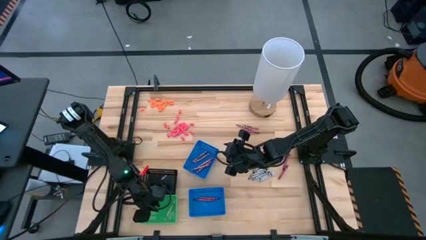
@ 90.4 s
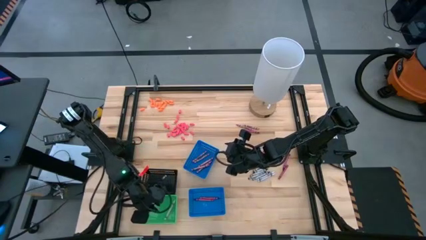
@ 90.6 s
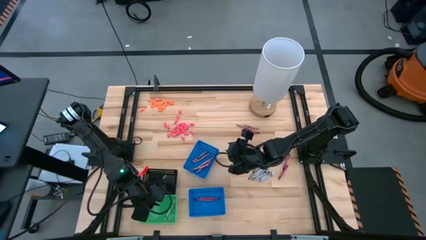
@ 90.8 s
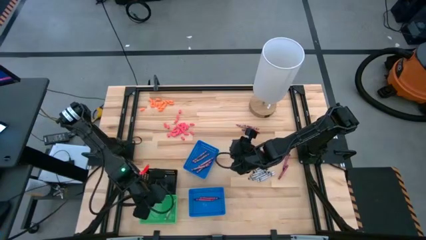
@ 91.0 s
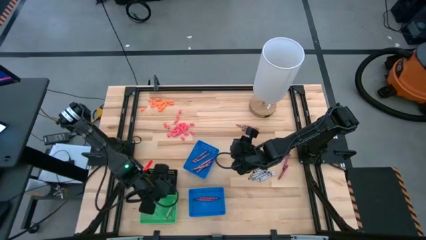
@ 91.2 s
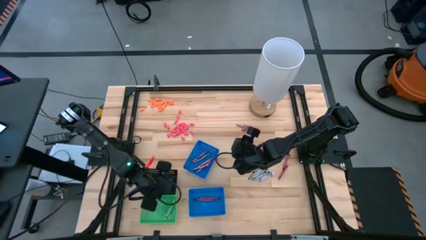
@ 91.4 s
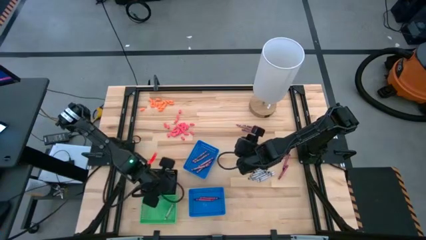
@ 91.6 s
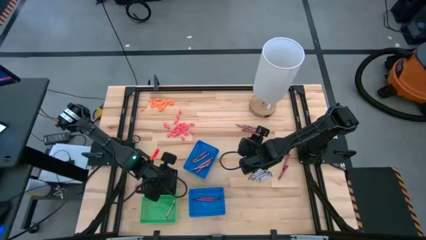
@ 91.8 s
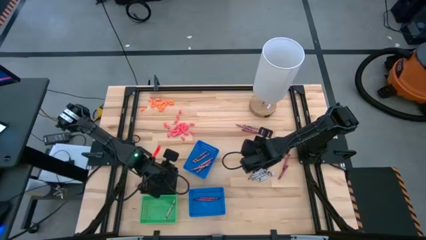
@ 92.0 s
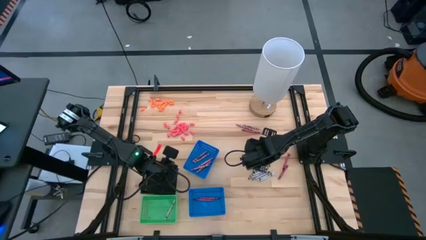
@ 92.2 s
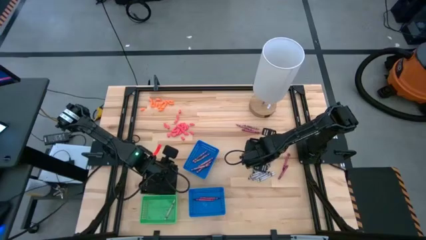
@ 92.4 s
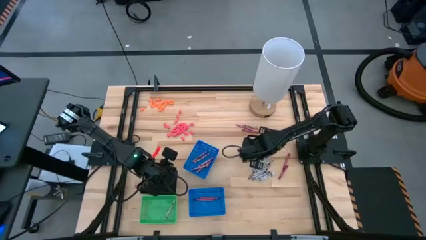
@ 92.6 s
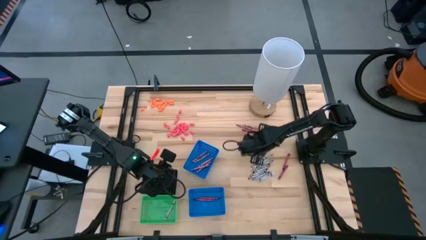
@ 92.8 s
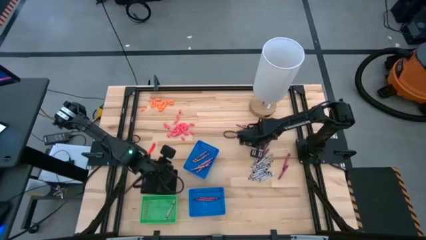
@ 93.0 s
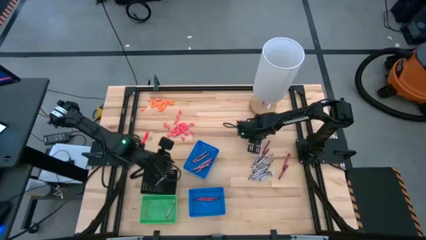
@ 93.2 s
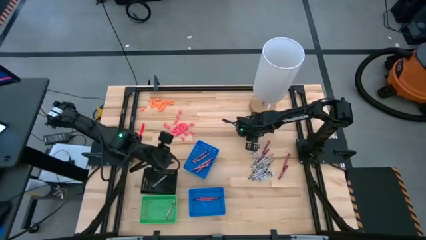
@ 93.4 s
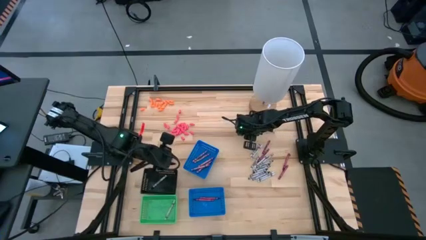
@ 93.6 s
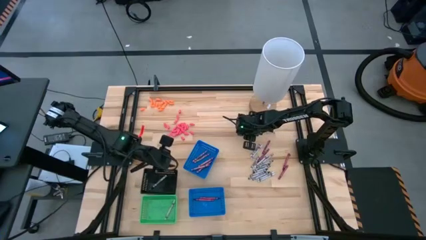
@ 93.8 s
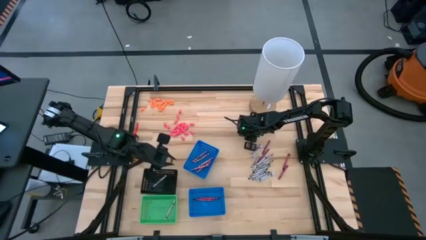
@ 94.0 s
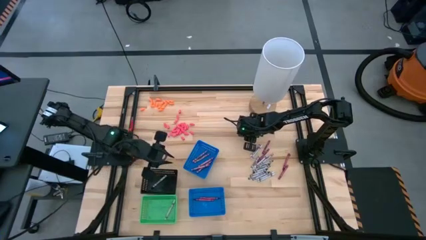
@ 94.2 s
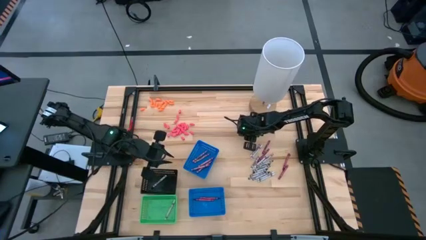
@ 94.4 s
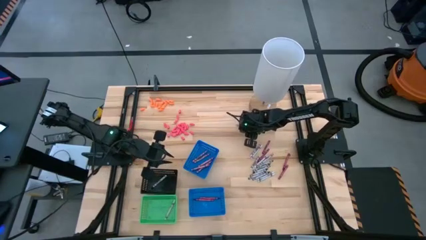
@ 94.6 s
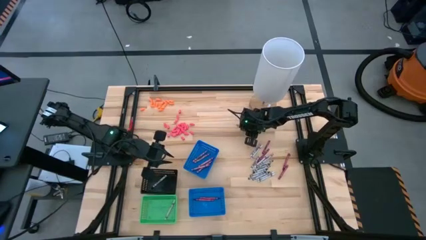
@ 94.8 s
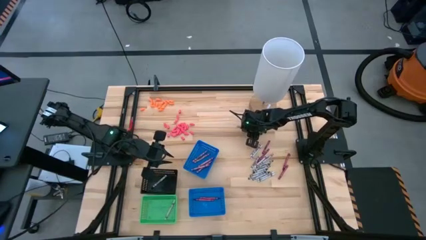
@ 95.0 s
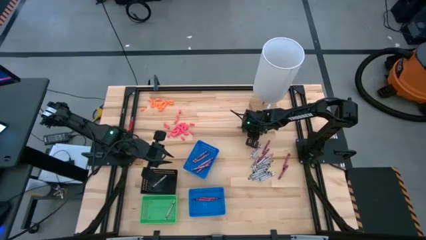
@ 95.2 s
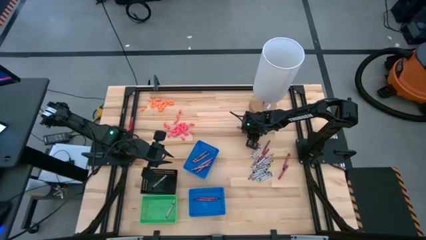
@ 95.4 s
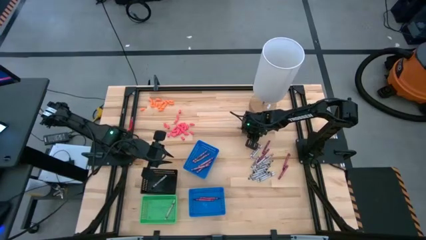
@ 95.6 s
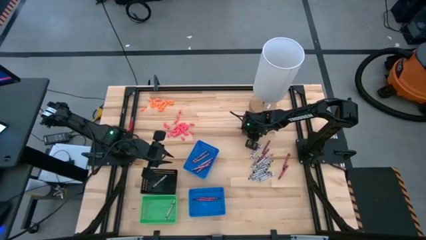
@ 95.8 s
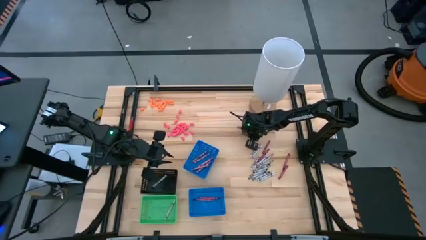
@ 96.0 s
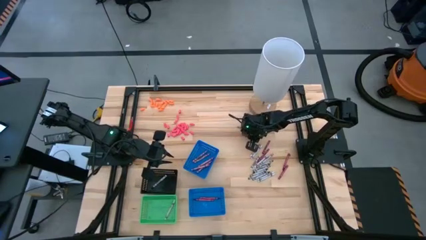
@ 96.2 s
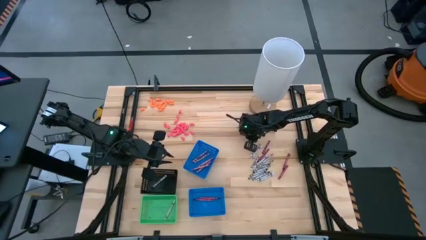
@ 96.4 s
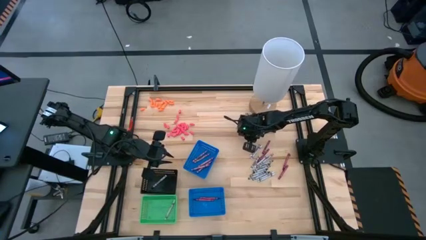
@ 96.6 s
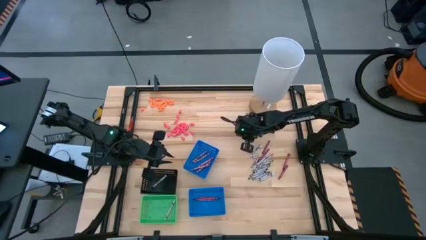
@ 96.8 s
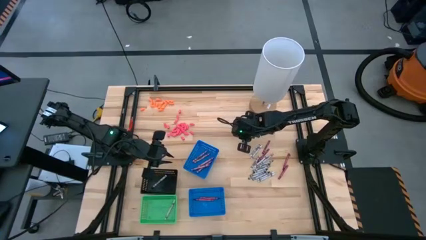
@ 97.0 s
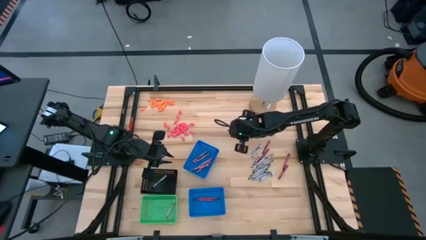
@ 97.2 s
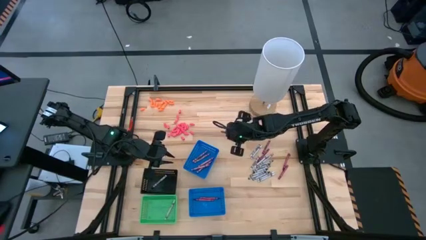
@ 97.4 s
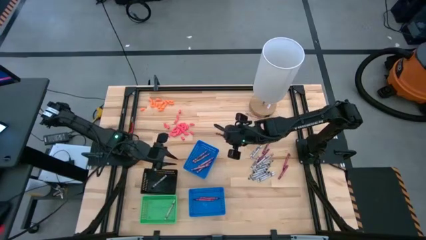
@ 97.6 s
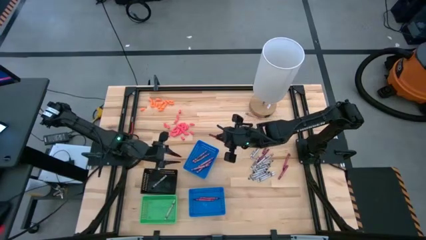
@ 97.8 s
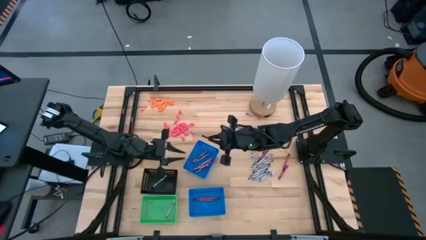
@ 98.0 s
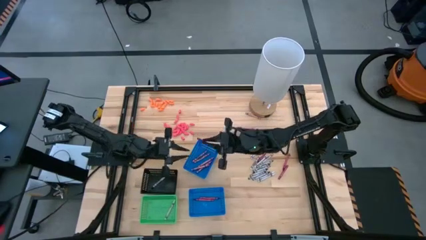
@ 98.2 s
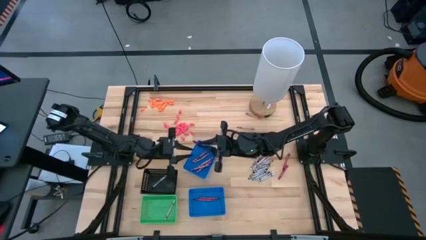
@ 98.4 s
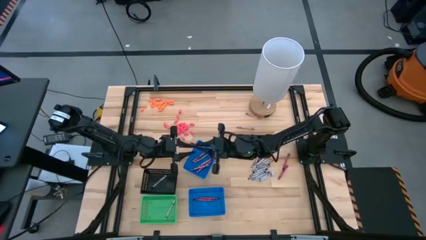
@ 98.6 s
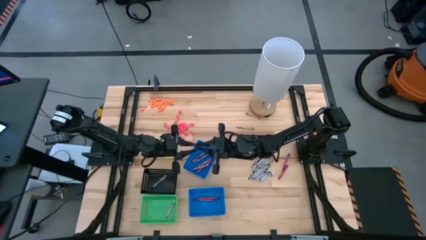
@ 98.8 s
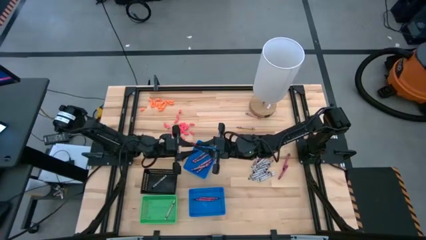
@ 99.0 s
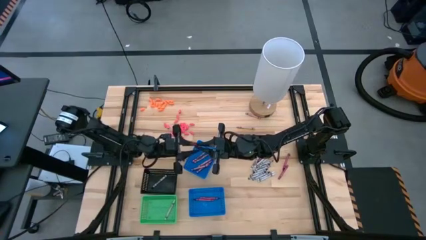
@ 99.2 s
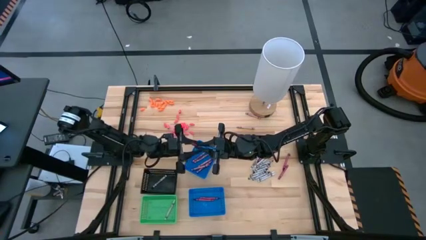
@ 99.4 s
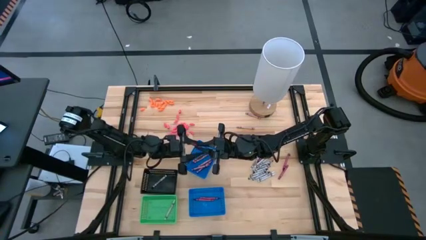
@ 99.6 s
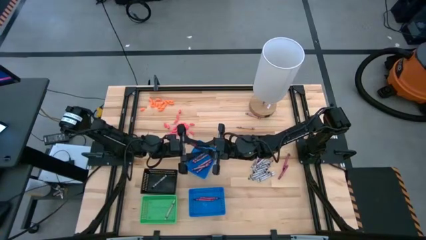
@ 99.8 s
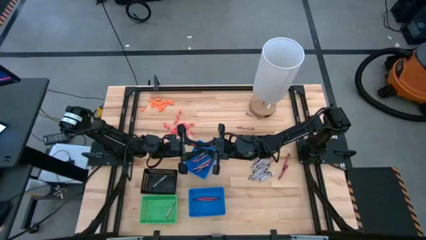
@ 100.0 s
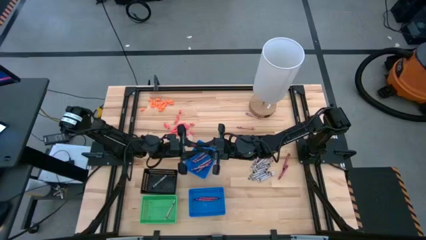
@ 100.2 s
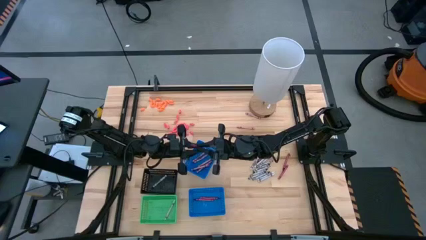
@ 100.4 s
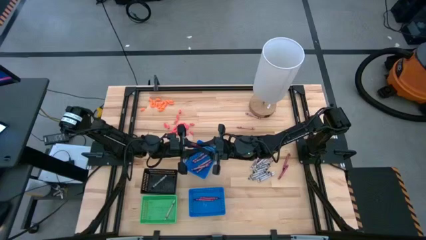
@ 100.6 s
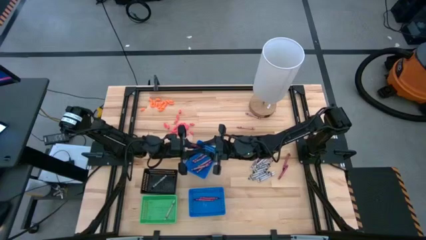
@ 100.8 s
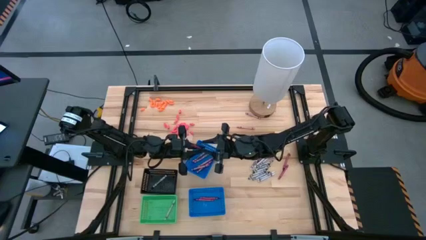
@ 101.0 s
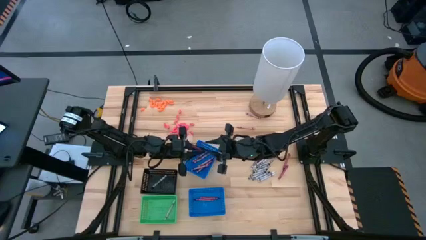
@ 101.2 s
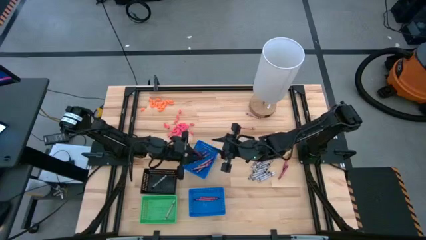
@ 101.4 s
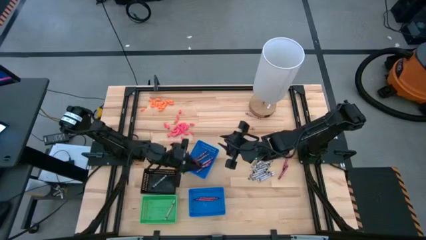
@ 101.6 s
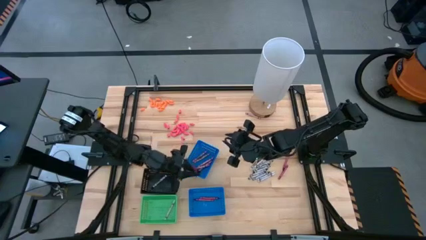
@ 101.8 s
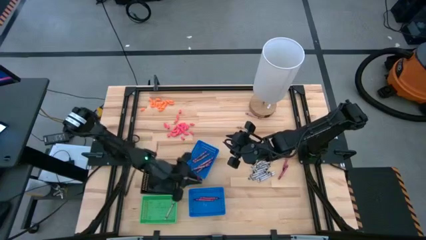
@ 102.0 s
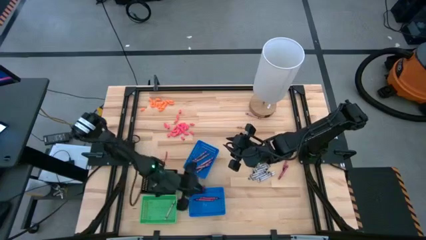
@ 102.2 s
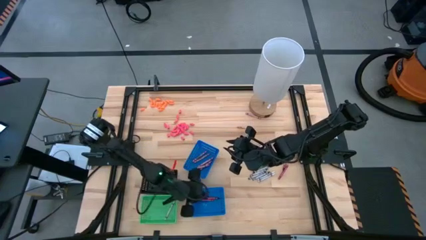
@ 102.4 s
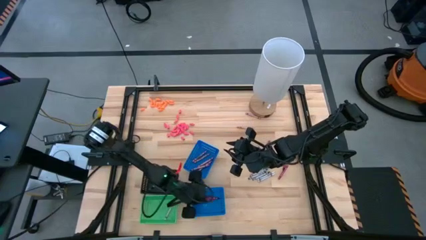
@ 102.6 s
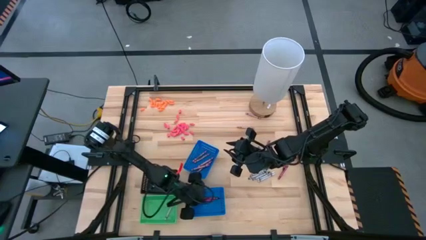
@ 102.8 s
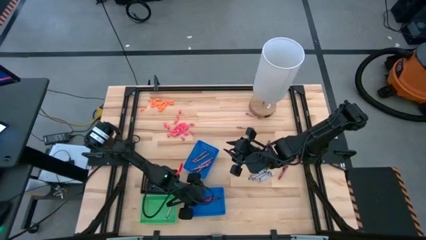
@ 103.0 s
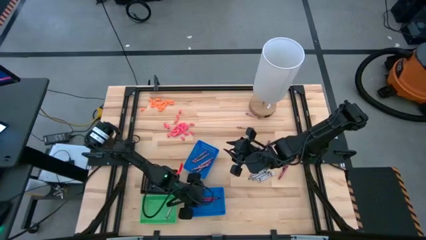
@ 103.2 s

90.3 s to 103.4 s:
Task: Sort crayons
Put the violet crayon into the bottom blue bin

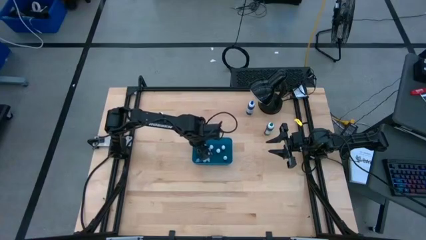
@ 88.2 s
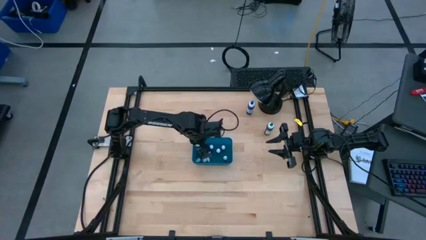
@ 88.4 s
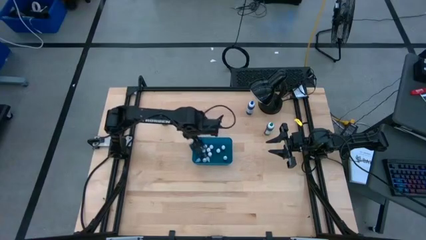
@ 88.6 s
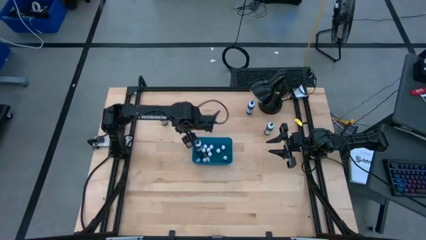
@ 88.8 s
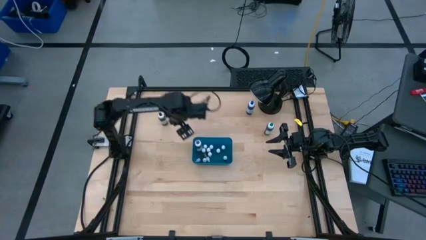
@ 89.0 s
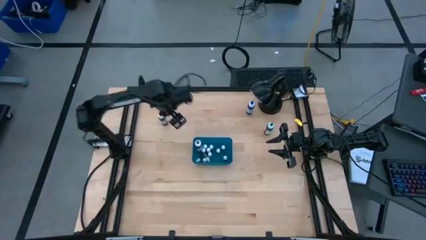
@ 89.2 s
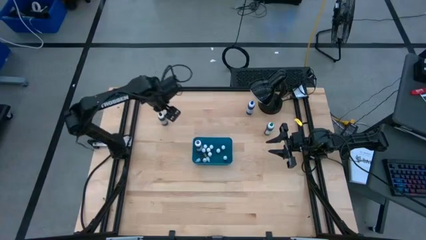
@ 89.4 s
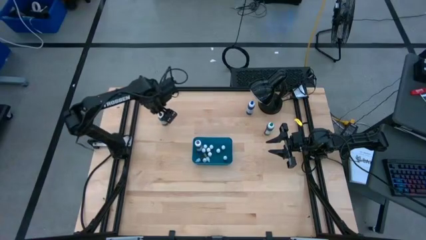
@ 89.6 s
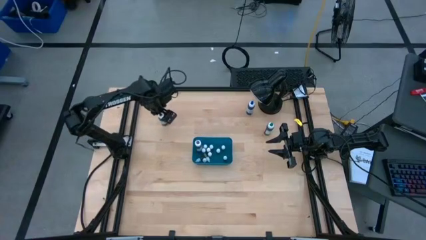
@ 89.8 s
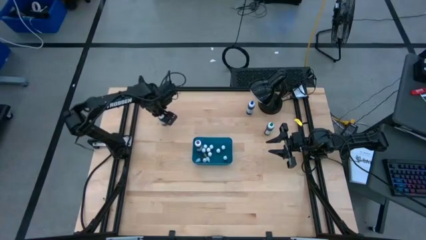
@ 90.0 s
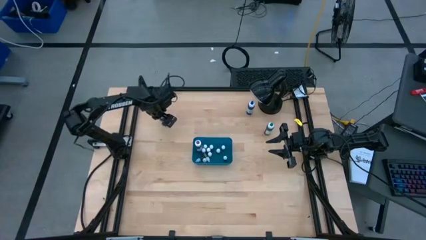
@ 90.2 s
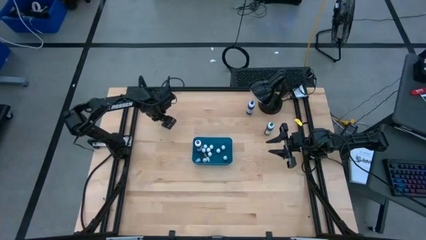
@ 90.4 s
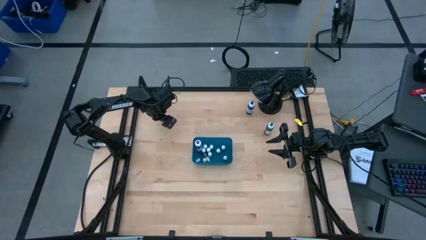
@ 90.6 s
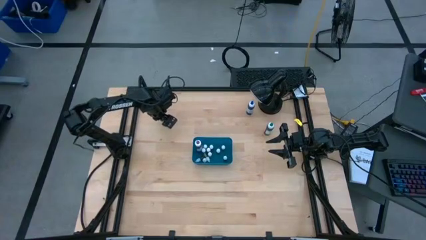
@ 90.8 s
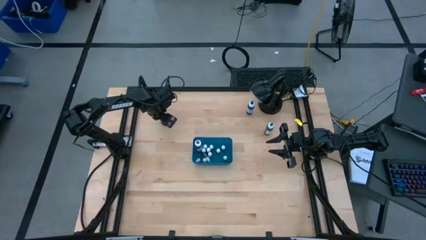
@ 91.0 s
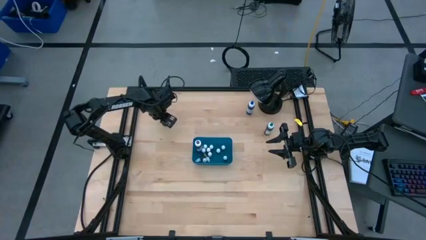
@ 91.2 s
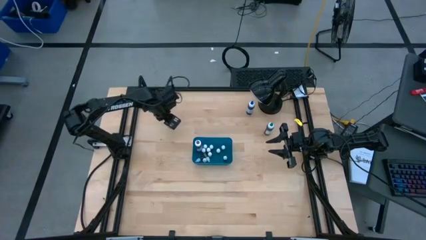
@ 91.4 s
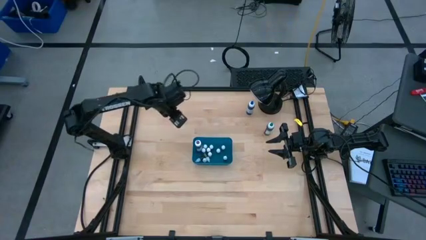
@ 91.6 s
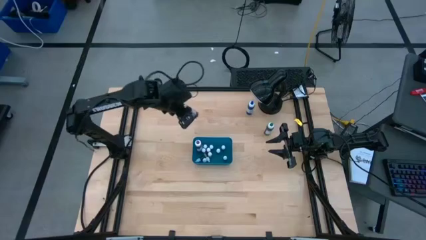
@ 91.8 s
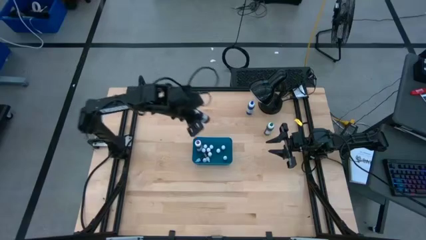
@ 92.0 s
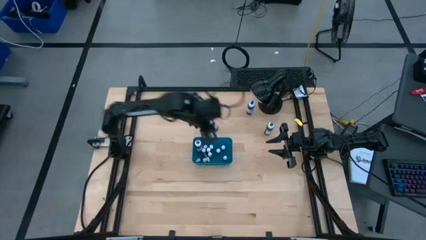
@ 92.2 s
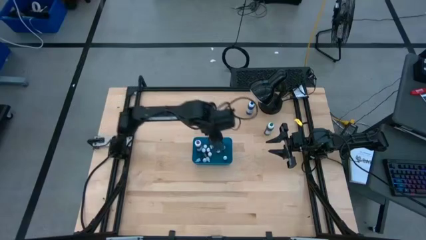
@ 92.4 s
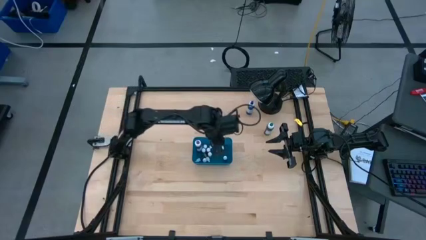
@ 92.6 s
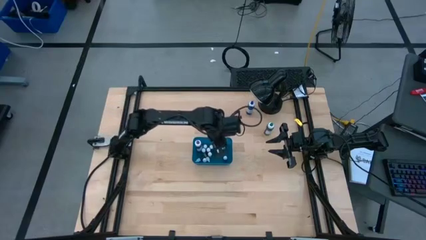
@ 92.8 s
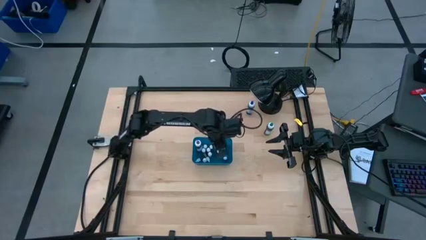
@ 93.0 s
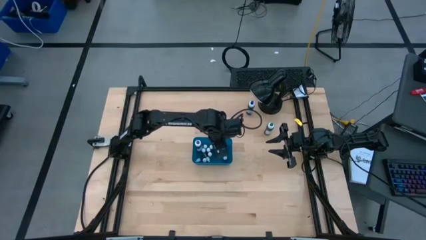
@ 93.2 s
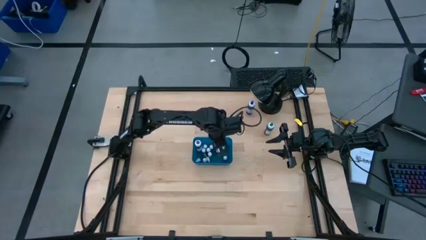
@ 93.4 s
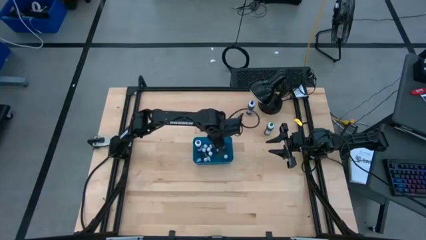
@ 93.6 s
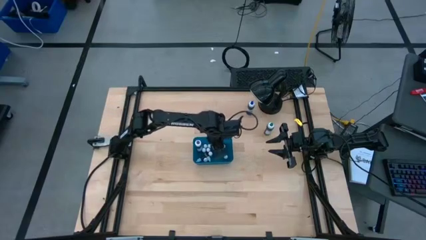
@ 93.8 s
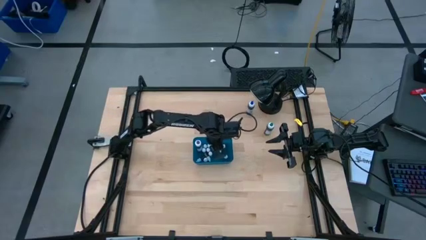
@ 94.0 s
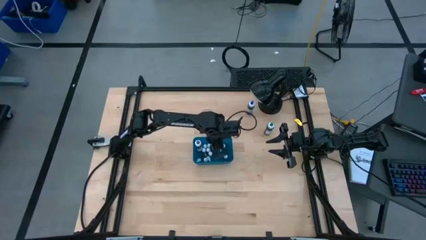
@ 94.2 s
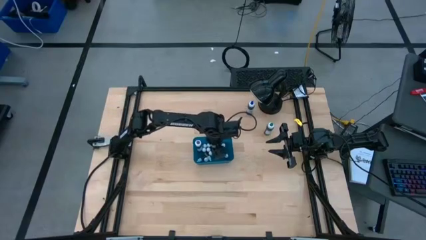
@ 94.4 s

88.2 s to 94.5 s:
Task: Pick & Place food coloring
Put the large black food coloring bottle into the blue bin
